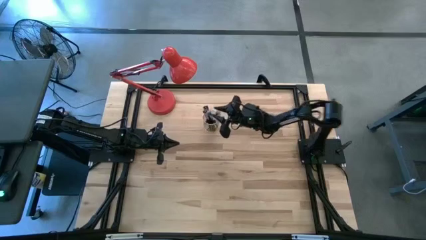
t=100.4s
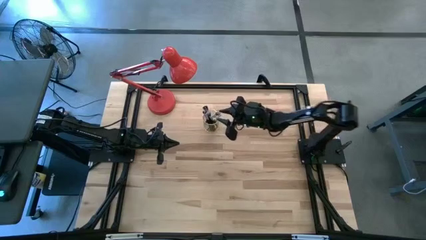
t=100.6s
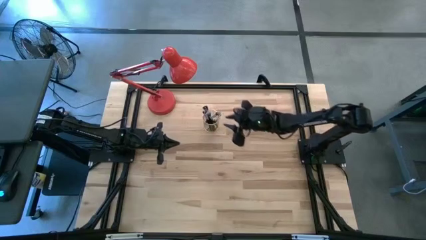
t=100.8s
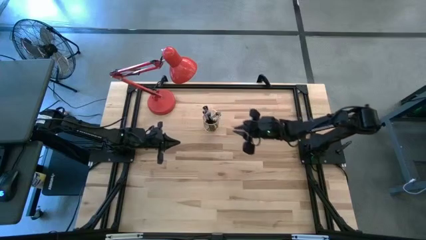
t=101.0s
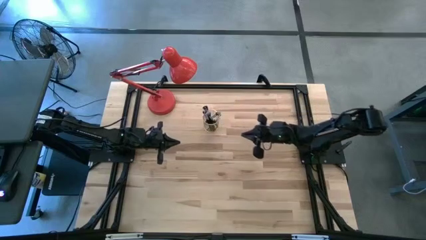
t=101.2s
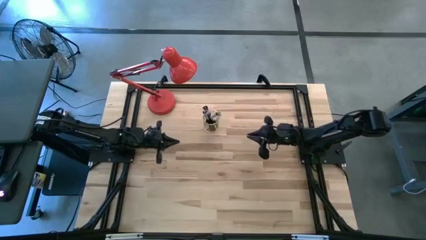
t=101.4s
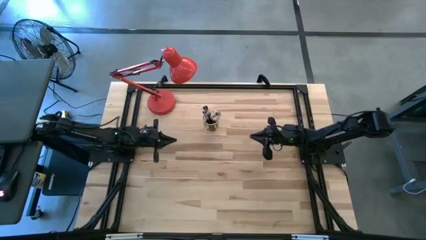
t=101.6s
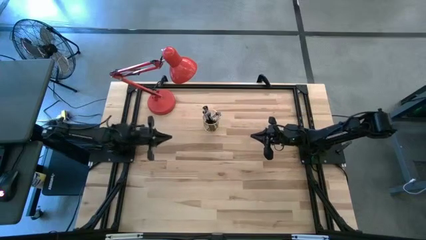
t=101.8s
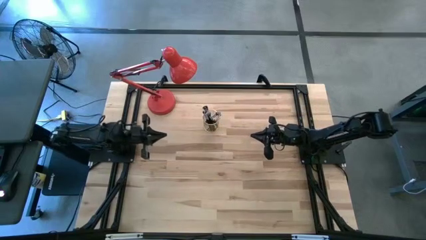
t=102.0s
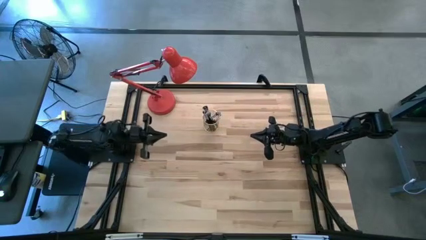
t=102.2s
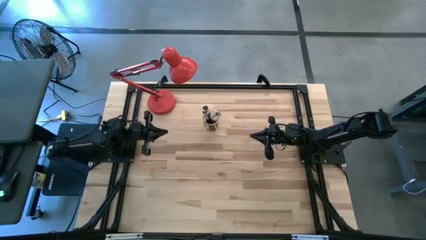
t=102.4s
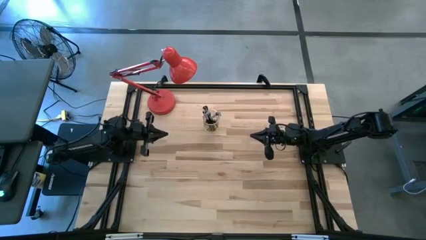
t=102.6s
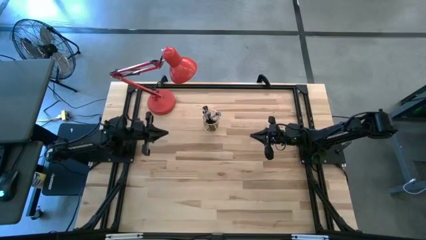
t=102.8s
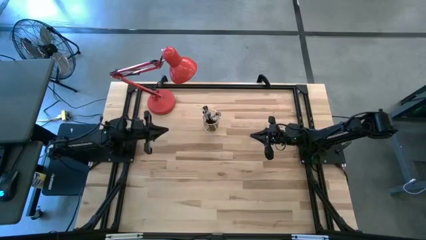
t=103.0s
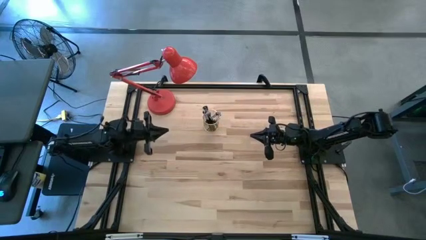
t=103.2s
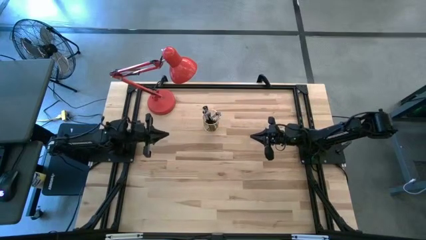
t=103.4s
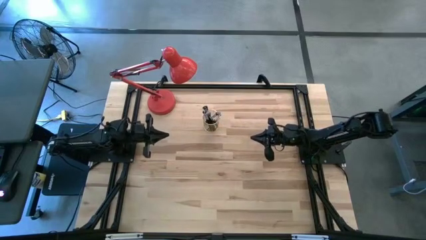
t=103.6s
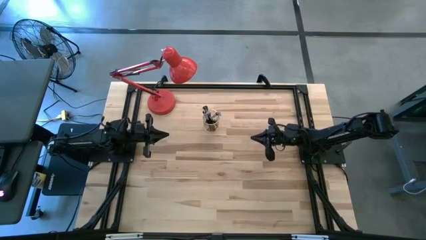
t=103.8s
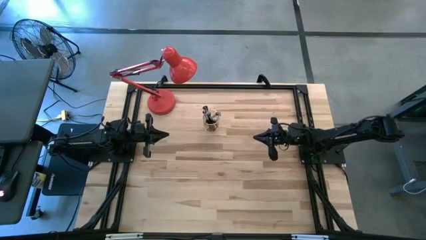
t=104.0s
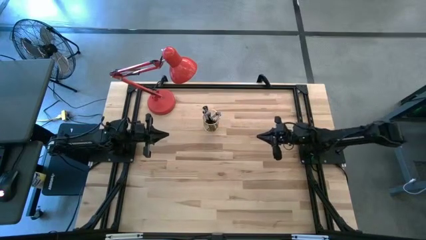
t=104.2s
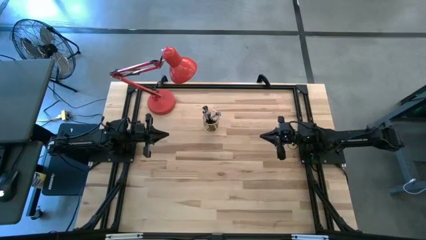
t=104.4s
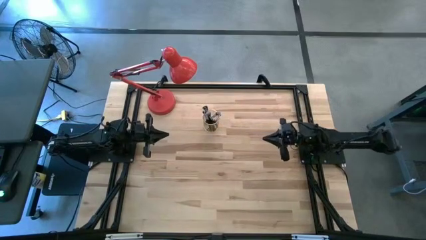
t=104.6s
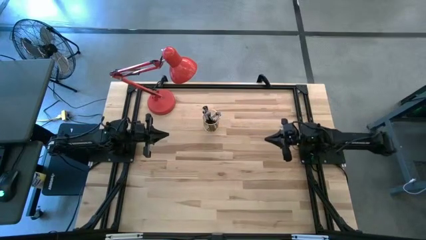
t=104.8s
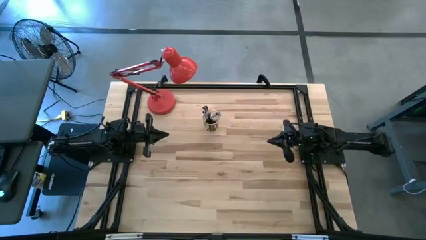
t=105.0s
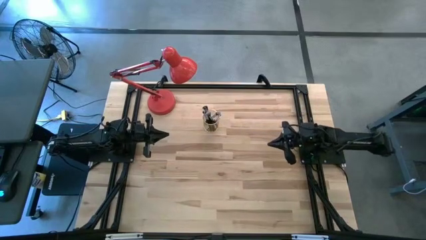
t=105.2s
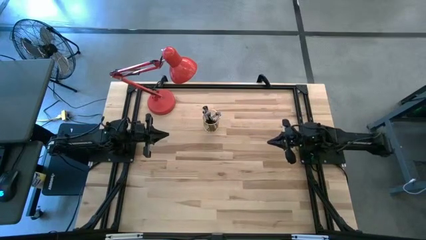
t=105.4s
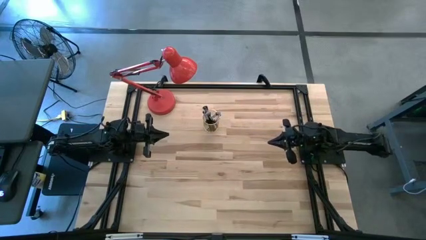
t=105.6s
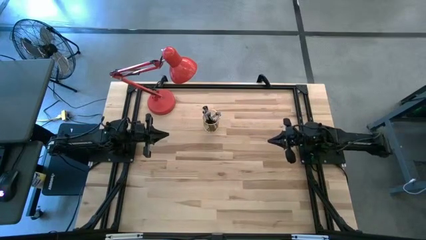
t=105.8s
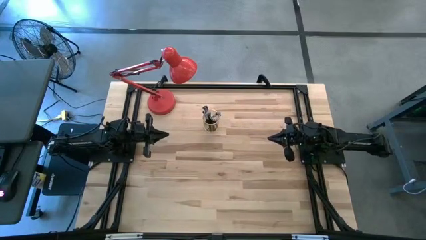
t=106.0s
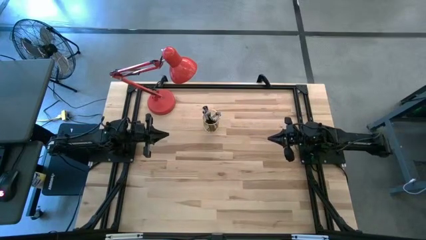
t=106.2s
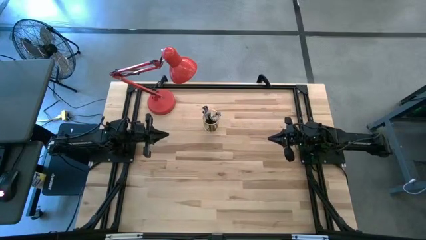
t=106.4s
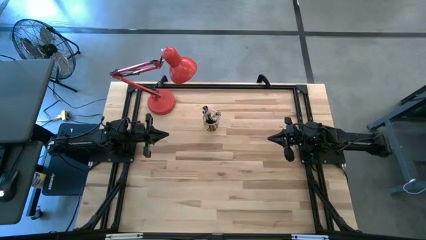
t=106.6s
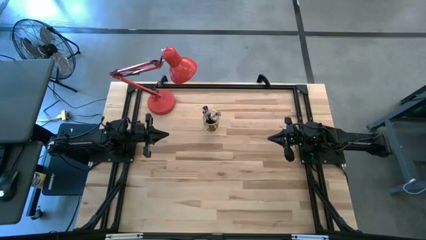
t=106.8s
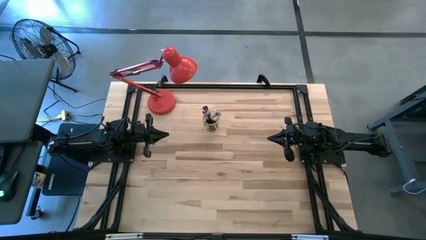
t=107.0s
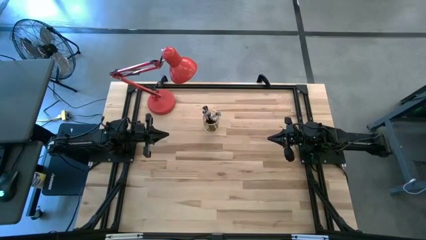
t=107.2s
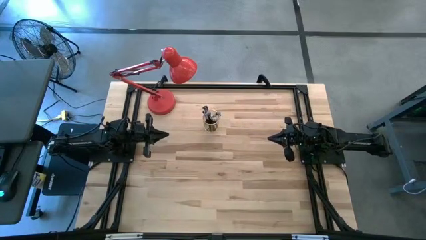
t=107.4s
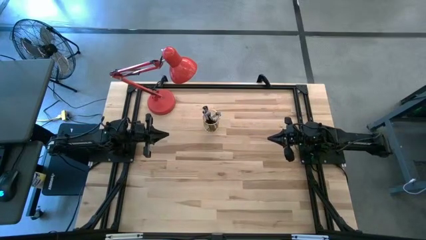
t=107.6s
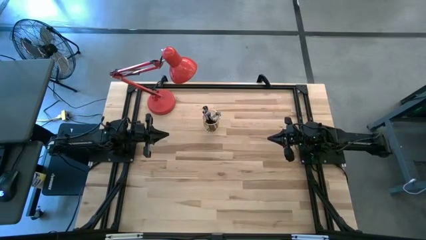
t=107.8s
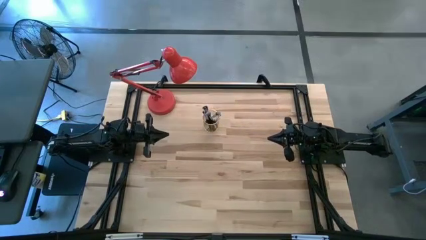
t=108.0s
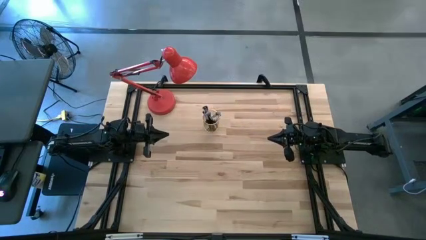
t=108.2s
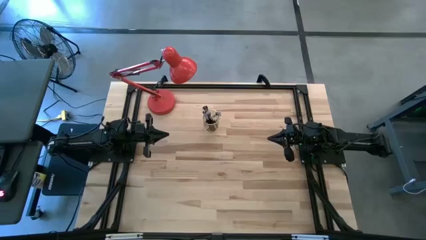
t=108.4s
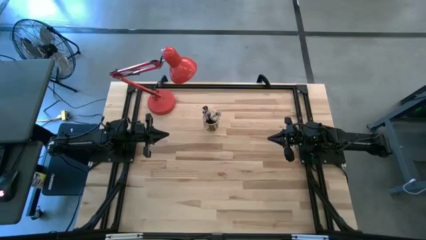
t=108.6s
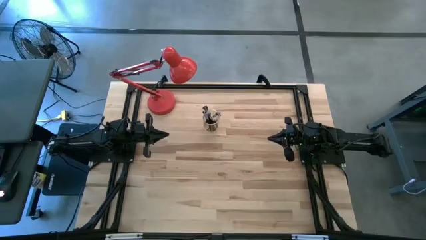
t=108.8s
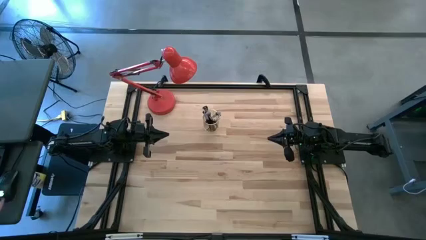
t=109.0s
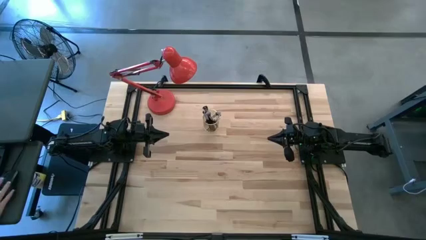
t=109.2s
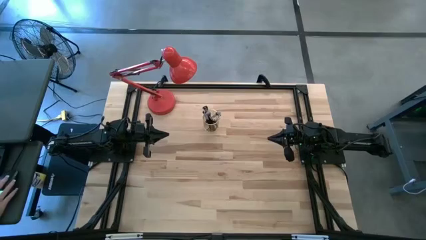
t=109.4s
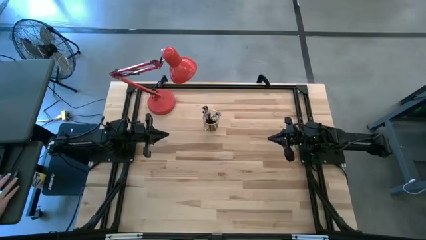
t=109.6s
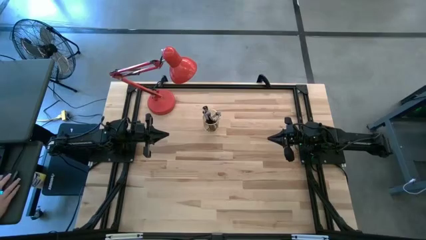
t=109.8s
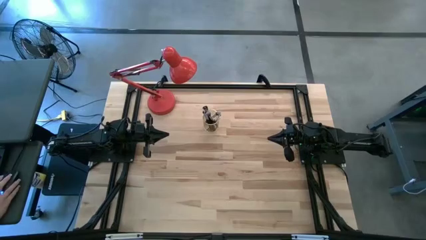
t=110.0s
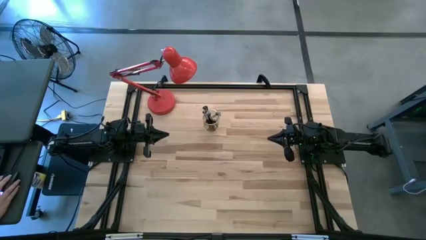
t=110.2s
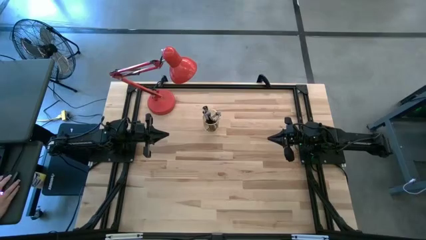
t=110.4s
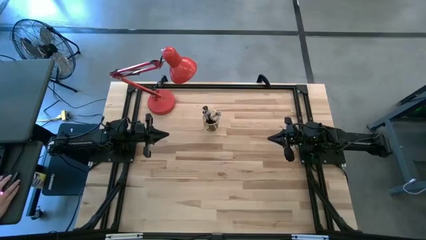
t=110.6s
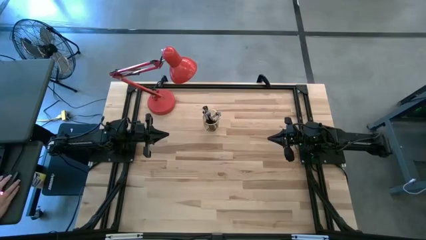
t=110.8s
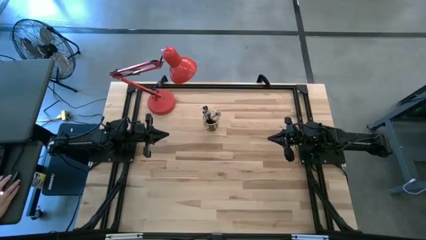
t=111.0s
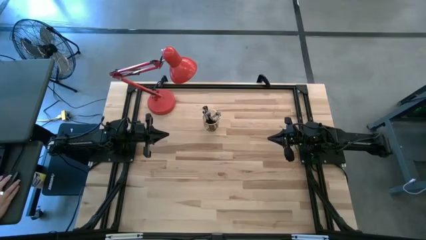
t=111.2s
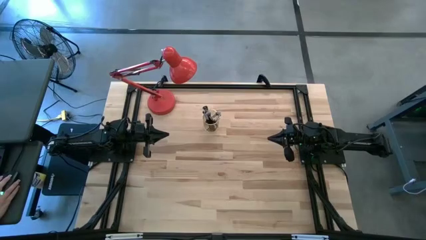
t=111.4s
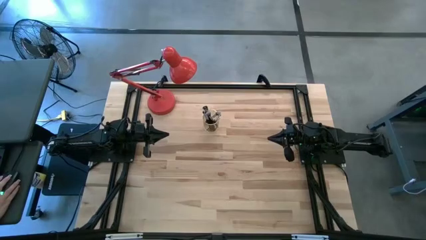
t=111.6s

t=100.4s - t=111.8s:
Task: Put items in baskets/containers
Return to Home Position

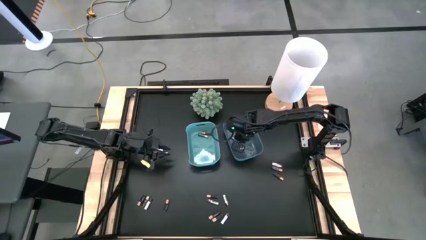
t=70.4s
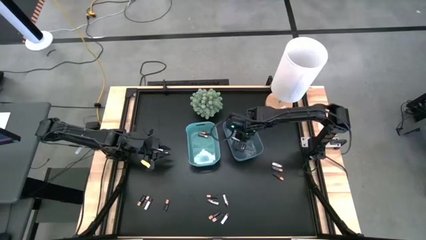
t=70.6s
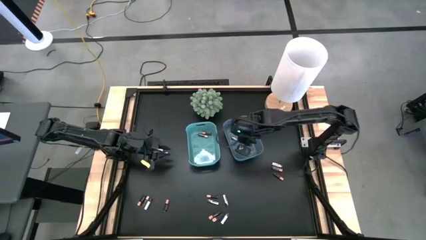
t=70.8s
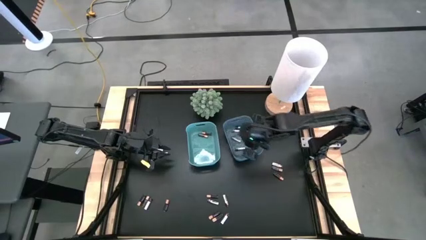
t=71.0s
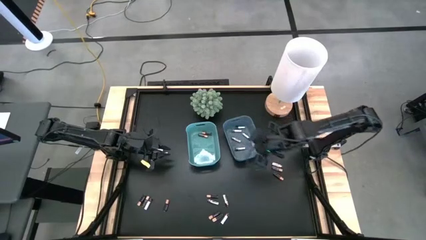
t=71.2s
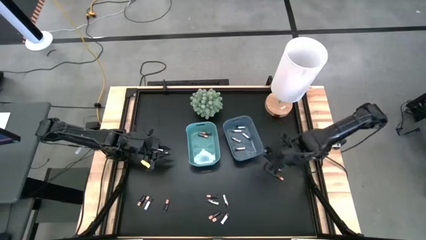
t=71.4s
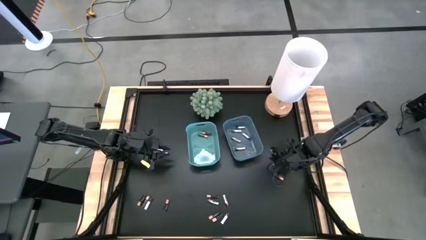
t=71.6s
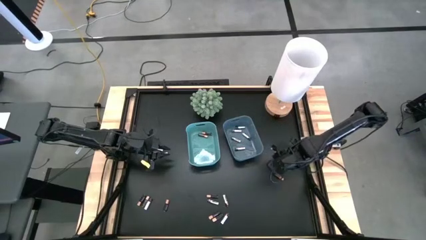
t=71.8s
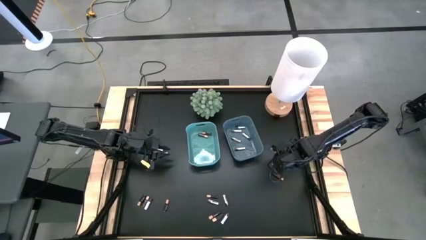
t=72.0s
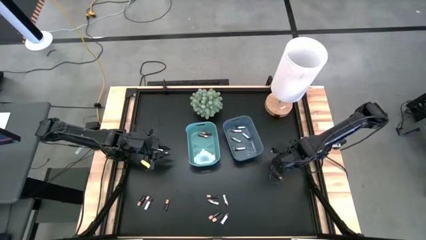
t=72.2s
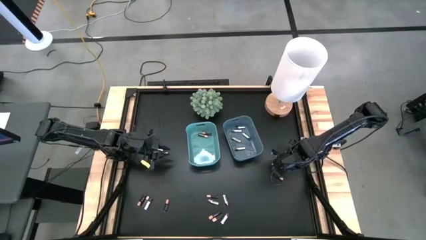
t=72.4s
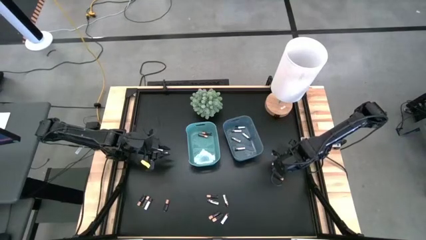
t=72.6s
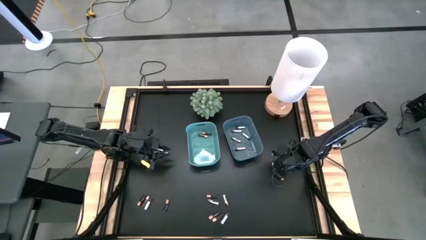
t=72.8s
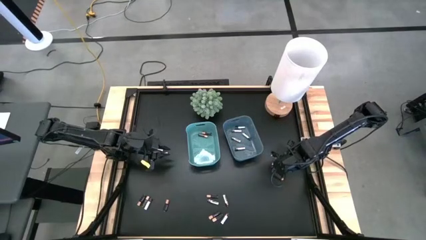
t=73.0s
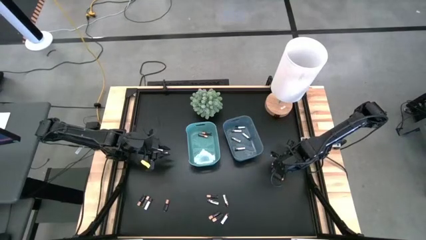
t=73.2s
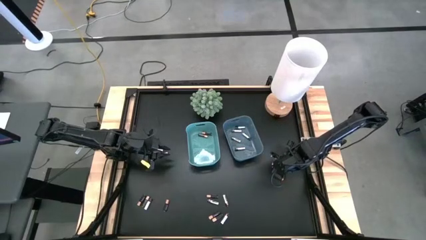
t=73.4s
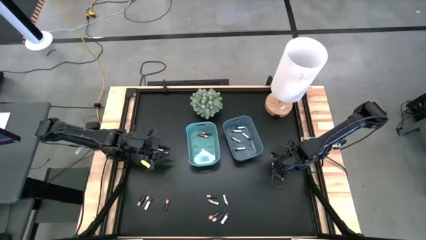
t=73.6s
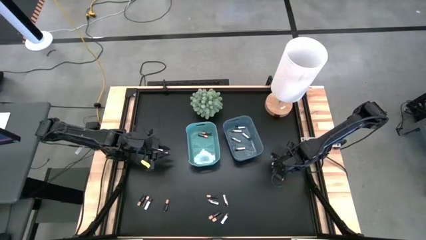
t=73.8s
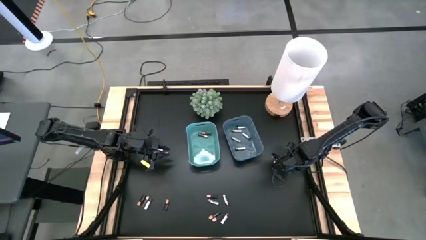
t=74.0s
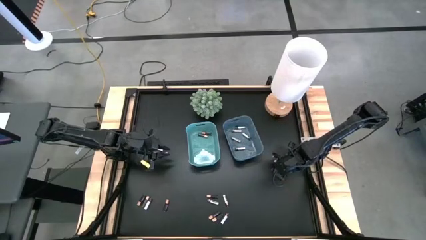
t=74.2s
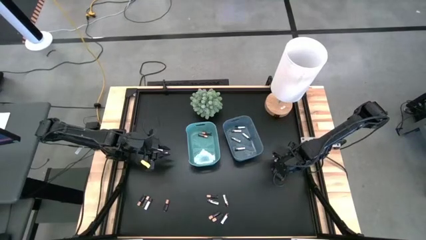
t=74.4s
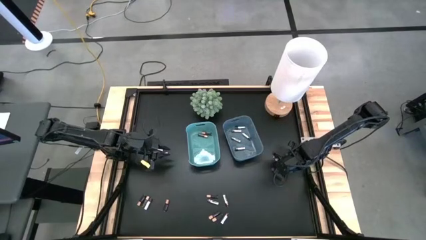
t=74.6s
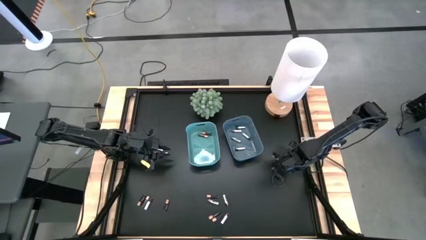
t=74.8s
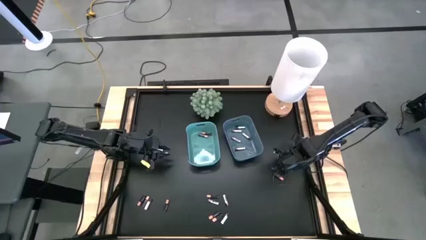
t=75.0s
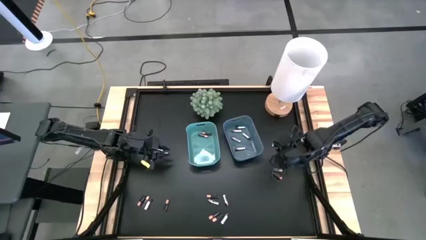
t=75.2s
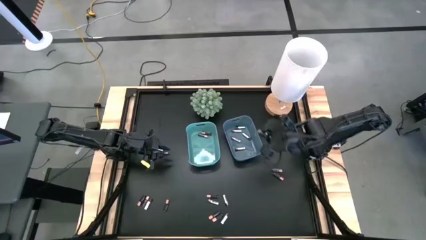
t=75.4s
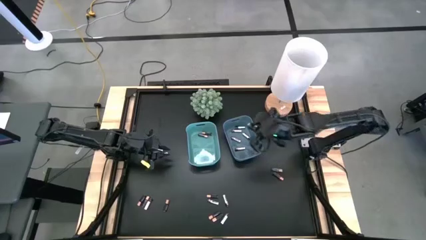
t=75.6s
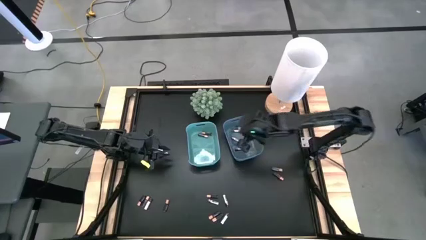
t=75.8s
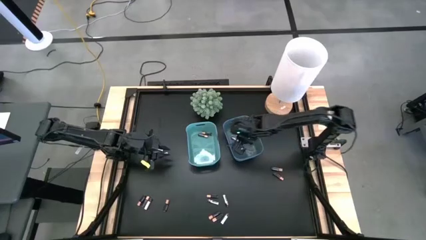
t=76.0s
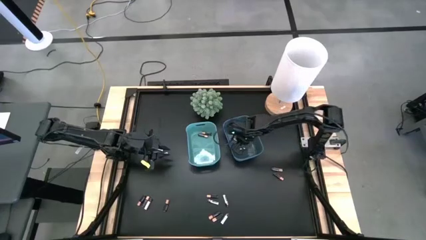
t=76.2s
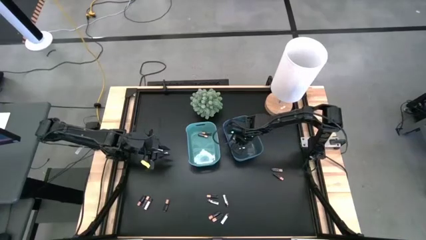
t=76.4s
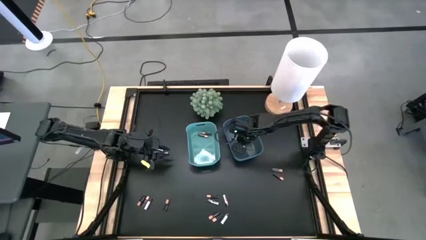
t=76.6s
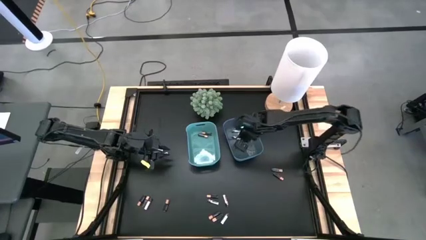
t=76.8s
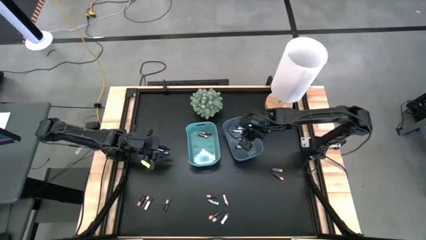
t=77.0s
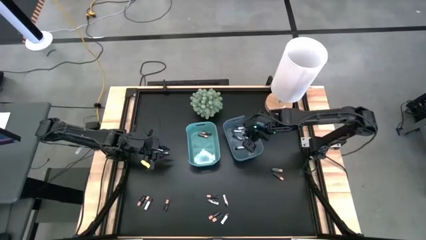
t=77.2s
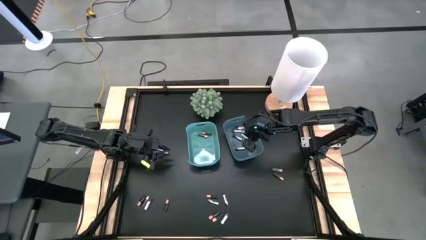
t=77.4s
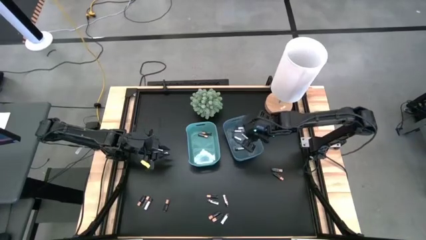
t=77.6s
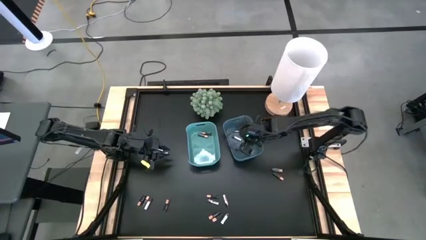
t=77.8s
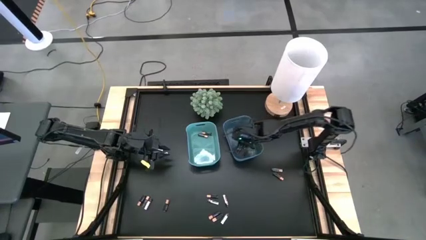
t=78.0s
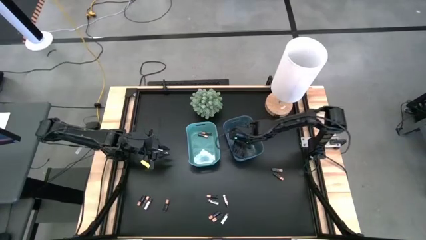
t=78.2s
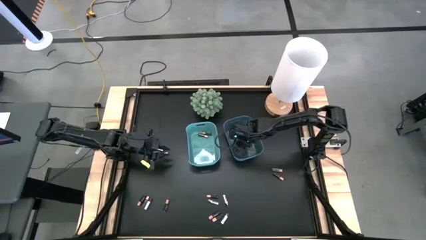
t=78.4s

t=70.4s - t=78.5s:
Task: Sort batteries
Put the white battery into the blue bin
